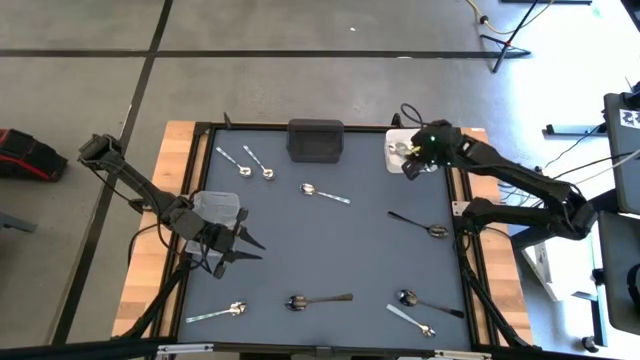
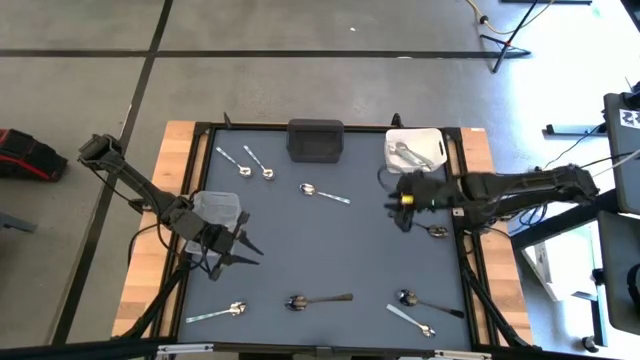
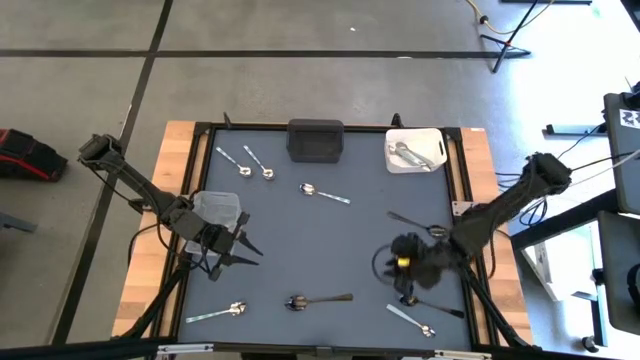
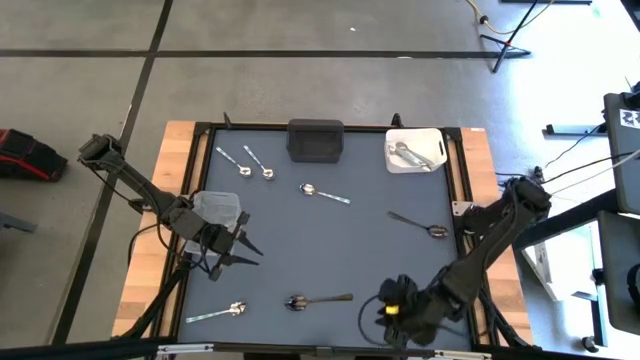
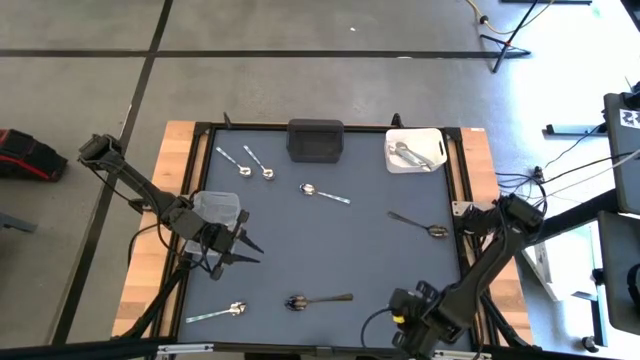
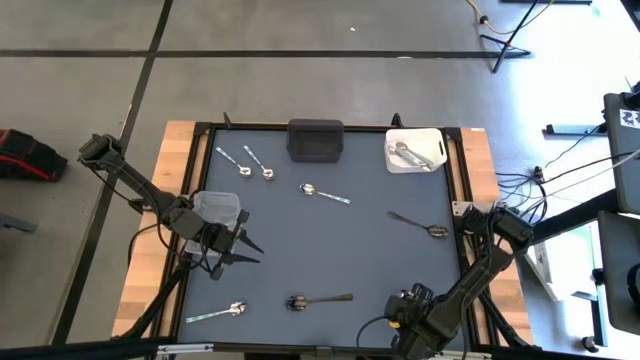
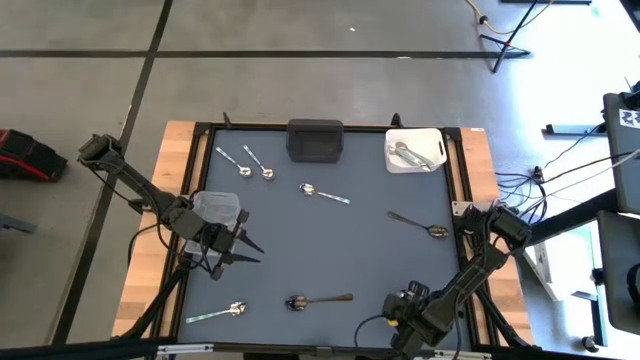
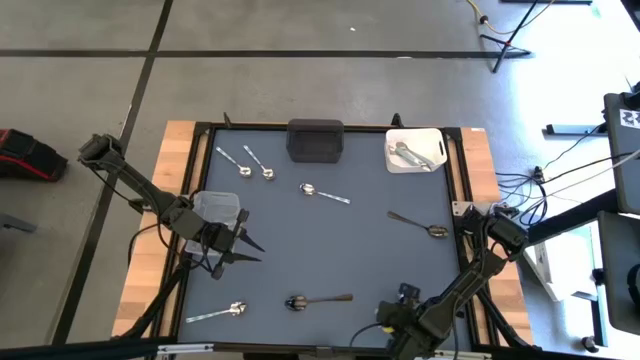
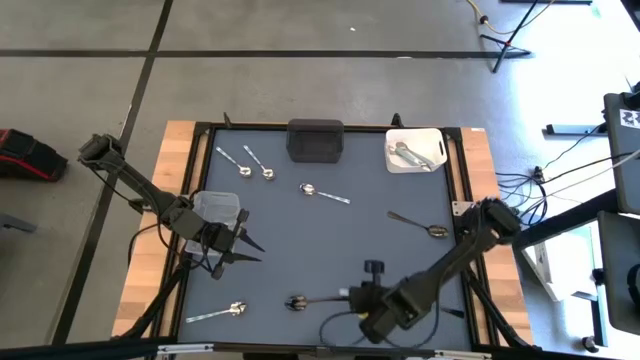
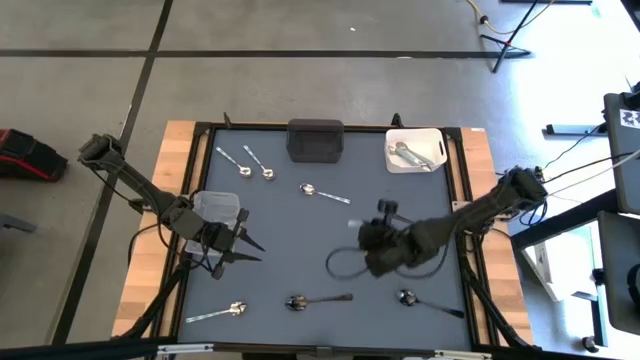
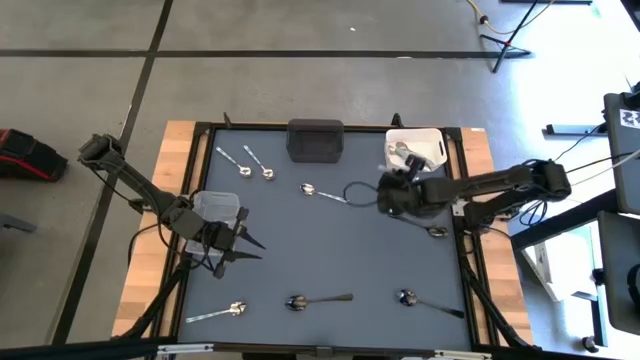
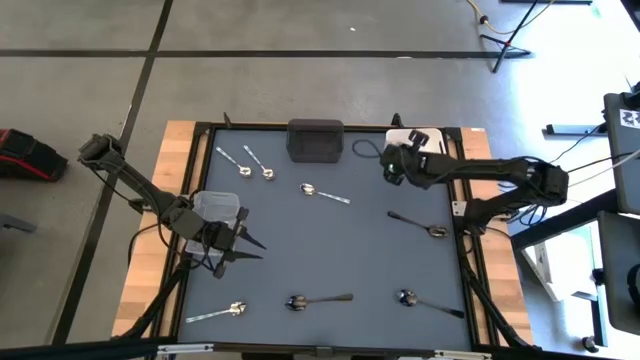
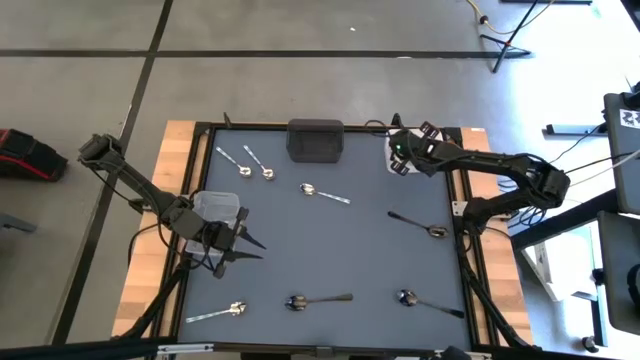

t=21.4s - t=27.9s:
Task: Sort silverware by color (type)
Put the light blue spoon into the white bin

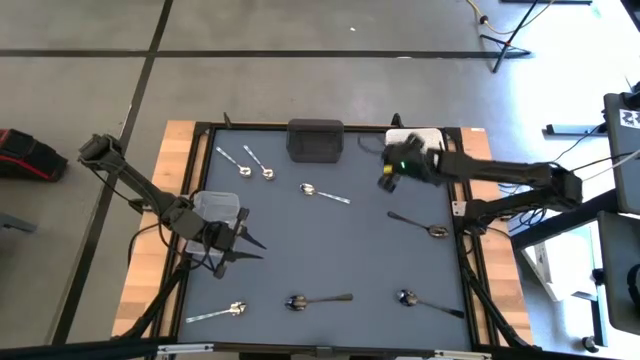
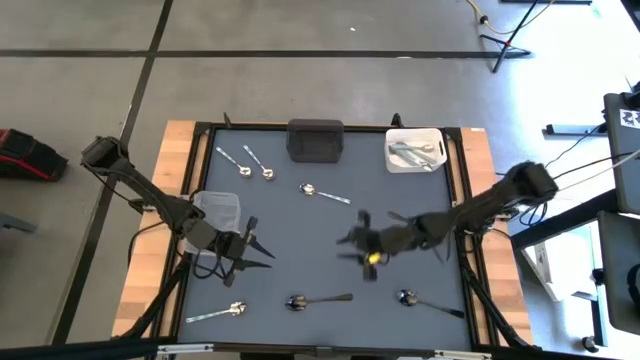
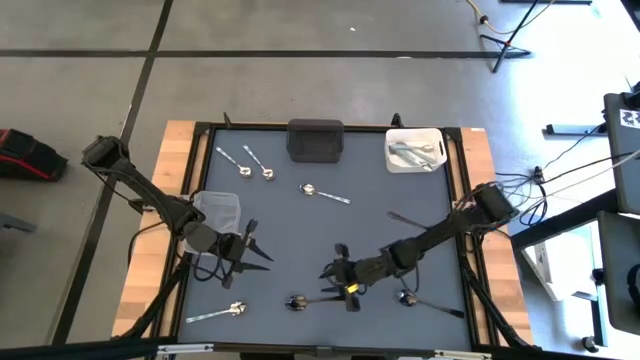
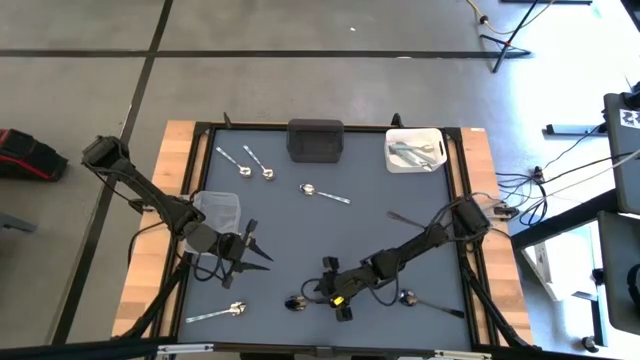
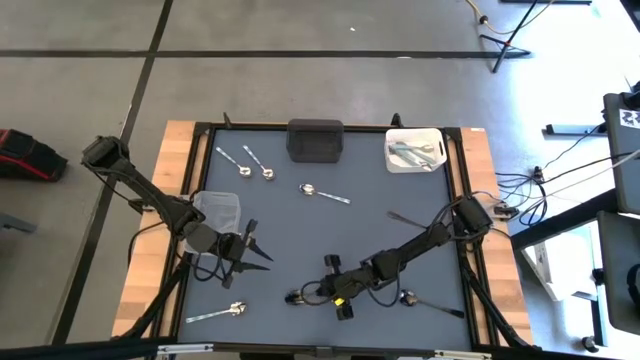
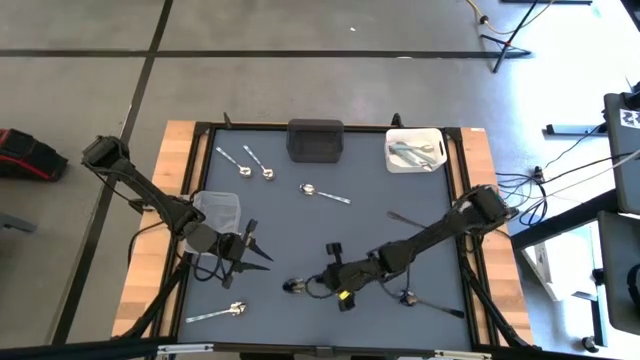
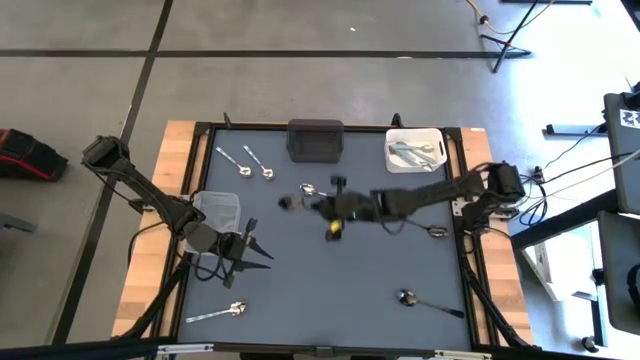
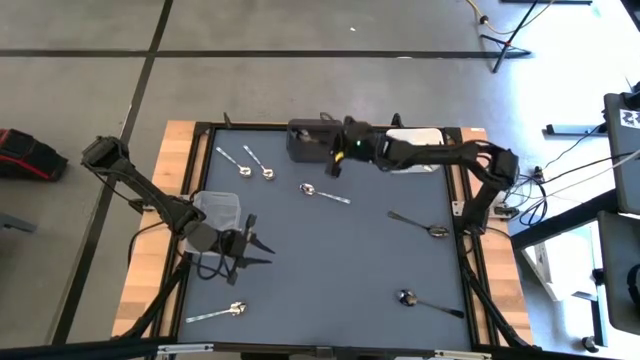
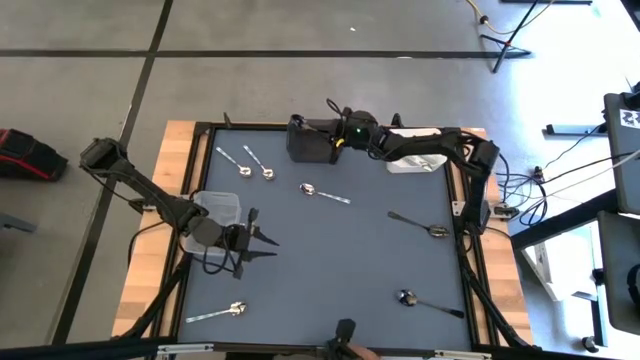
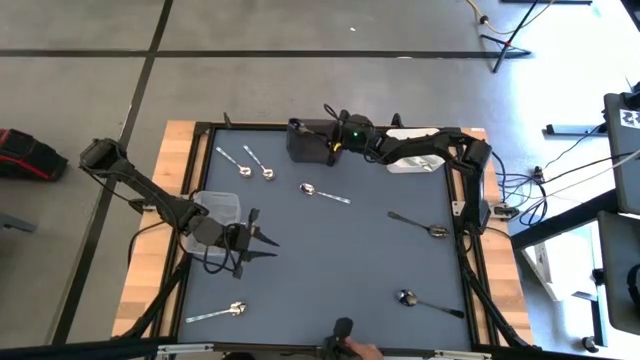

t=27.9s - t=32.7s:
Put the left black spoon into the black bin

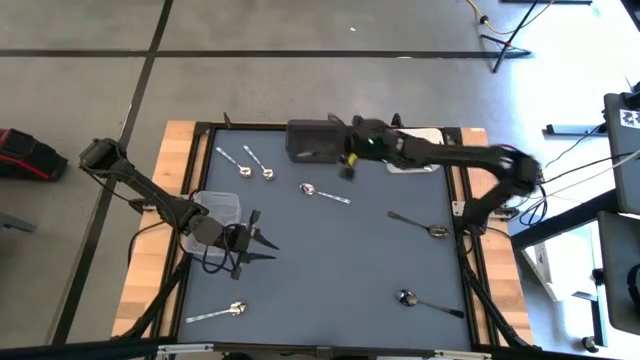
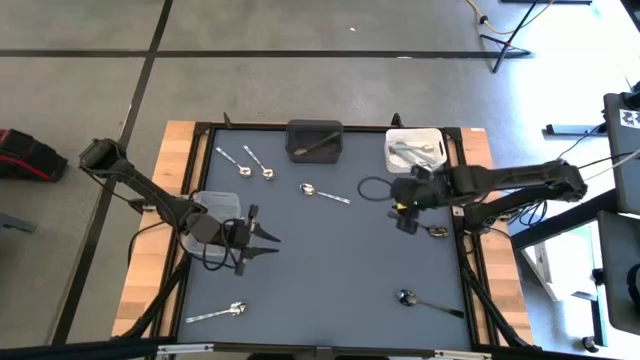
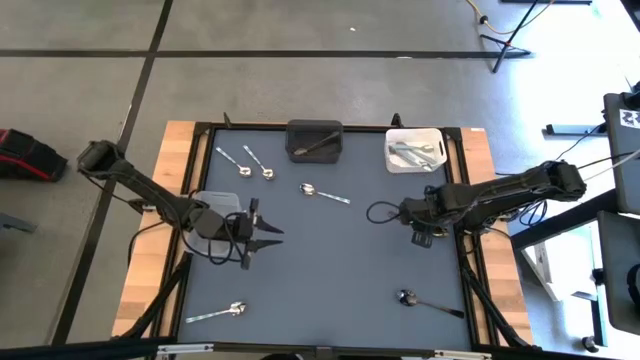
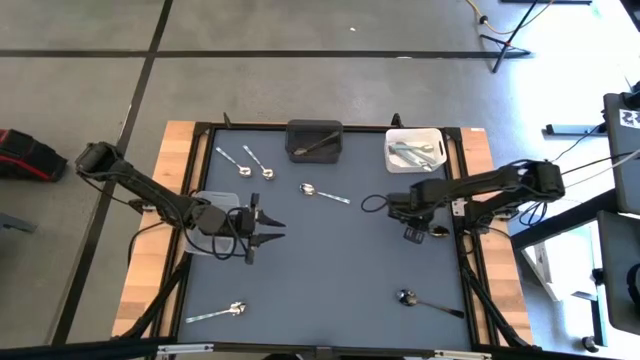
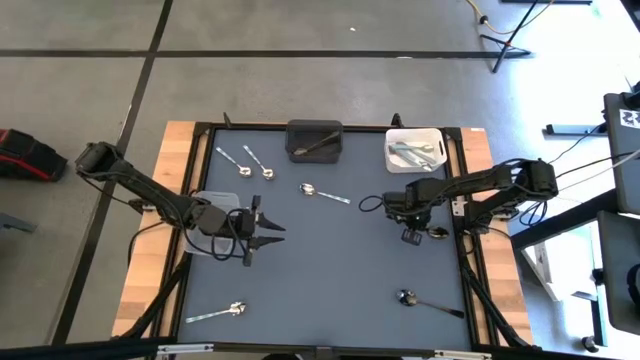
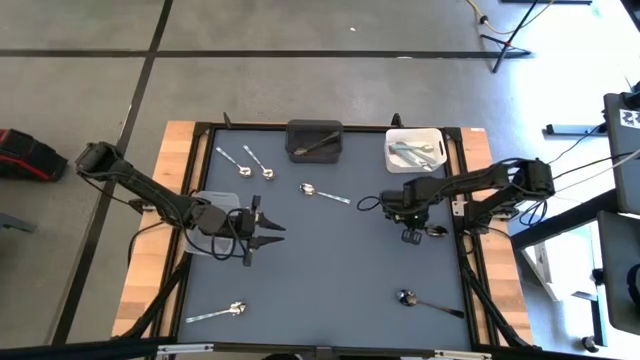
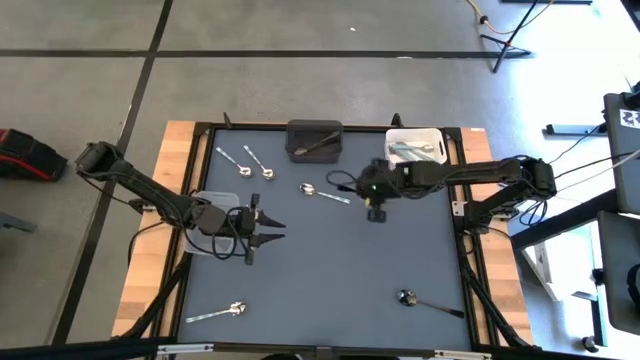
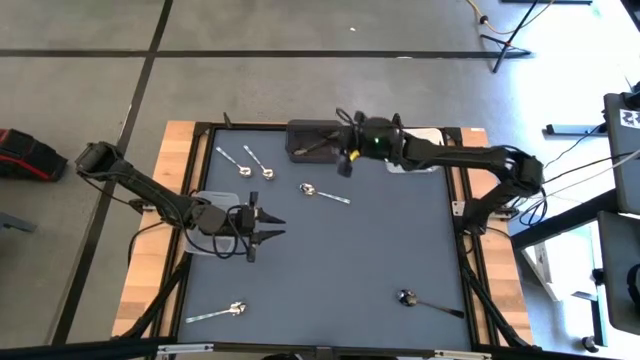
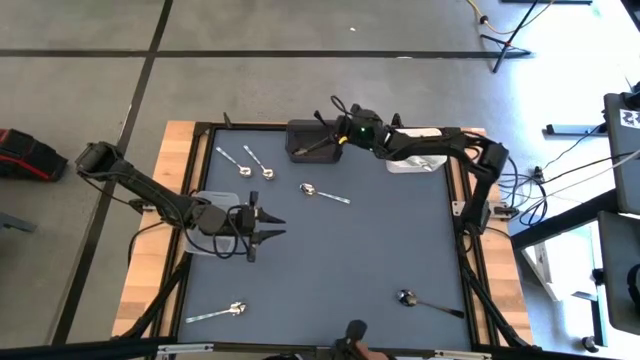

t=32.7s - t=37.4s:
Put the top black spoon into the black bin

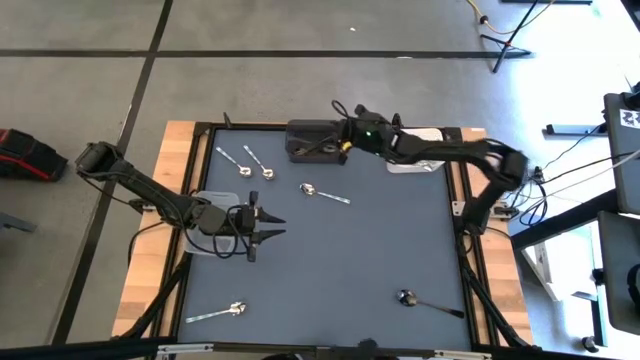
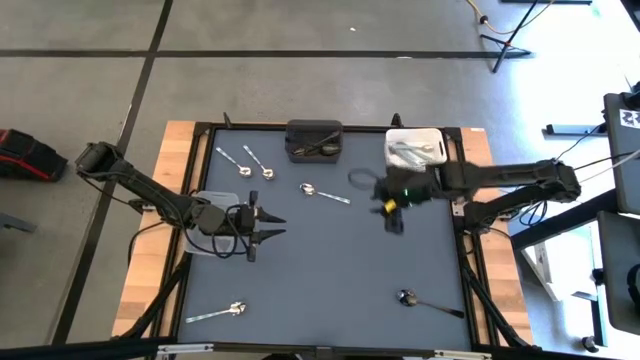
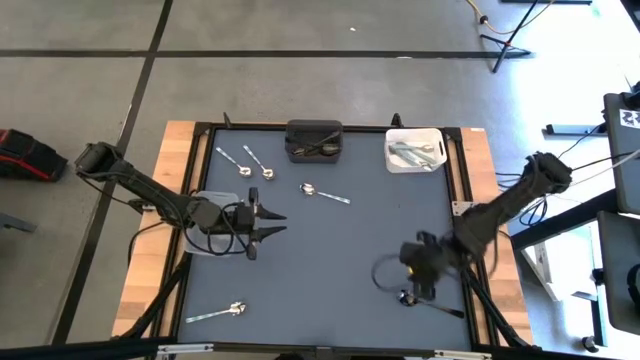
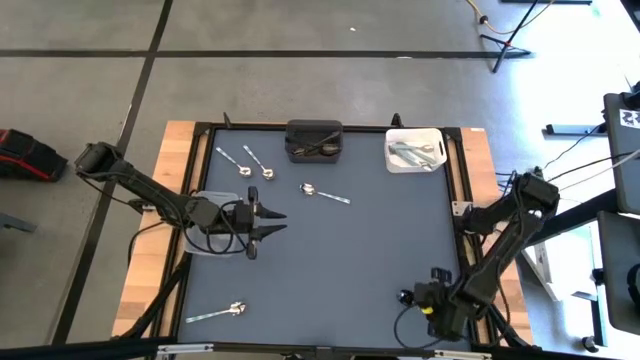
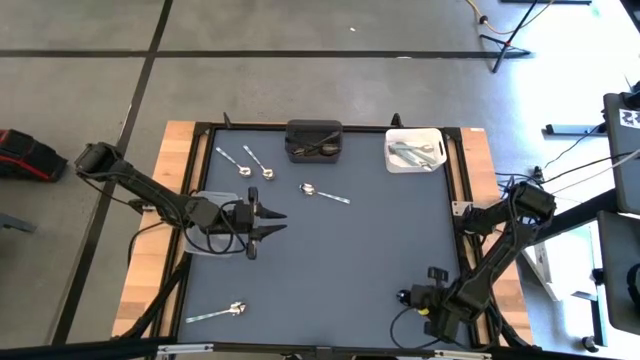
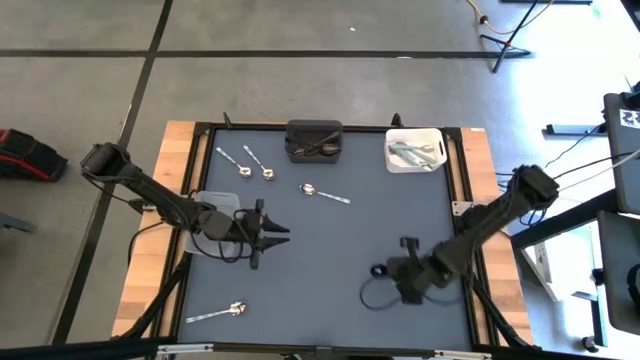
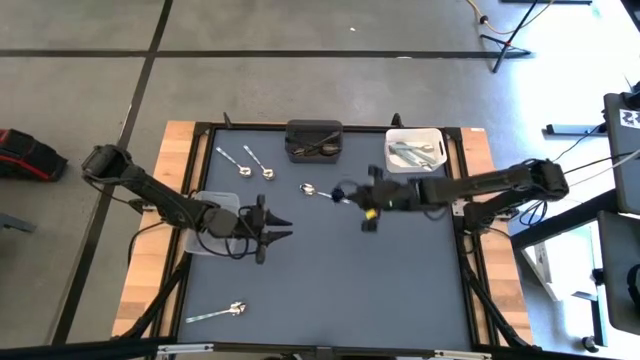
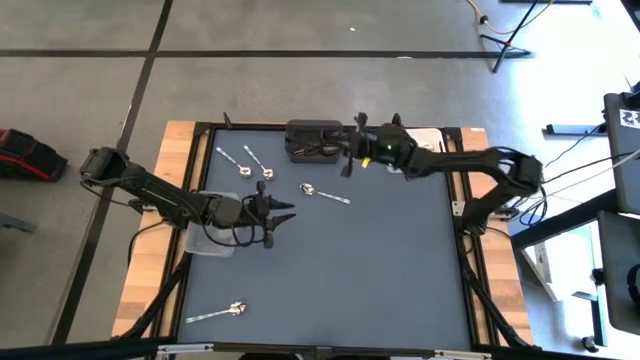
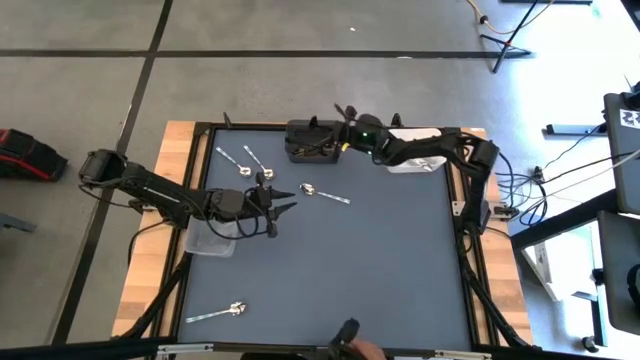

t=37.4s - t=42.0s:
Put the black spoon into the black bin
